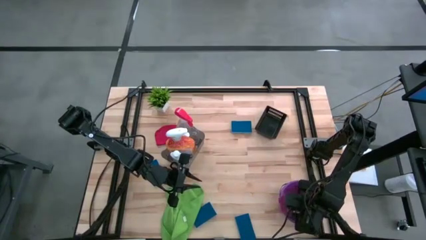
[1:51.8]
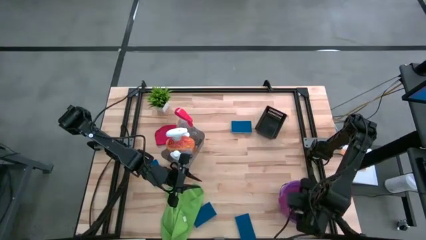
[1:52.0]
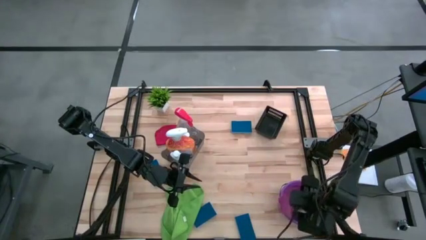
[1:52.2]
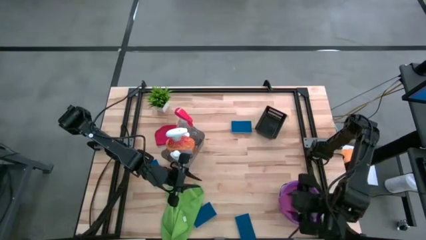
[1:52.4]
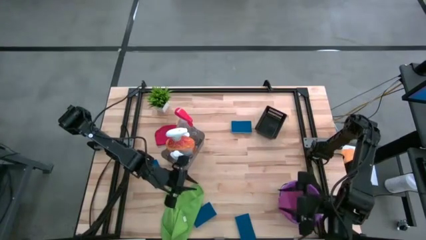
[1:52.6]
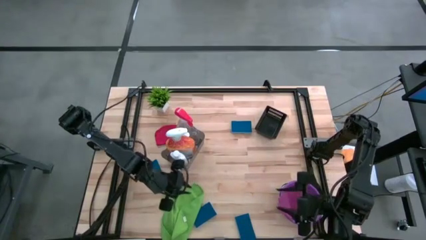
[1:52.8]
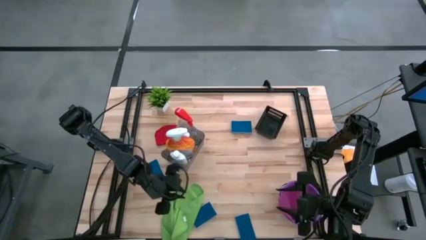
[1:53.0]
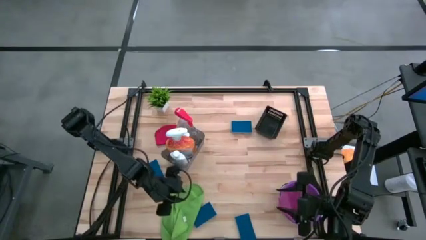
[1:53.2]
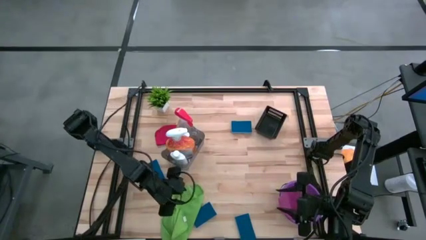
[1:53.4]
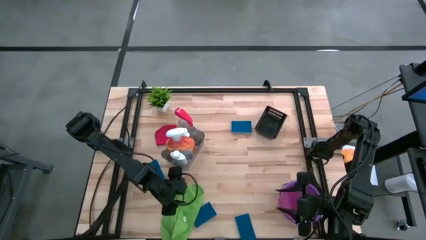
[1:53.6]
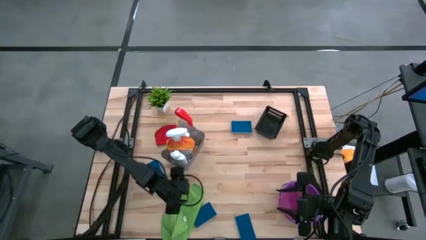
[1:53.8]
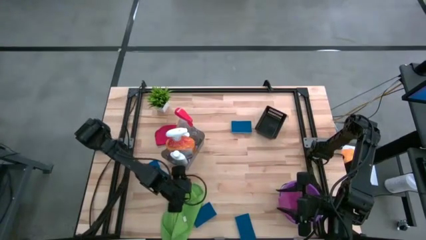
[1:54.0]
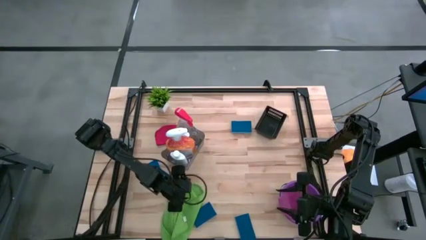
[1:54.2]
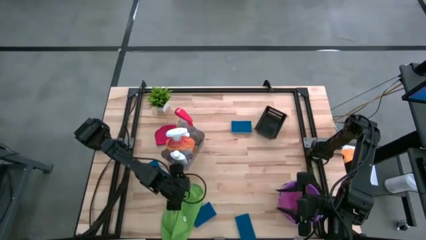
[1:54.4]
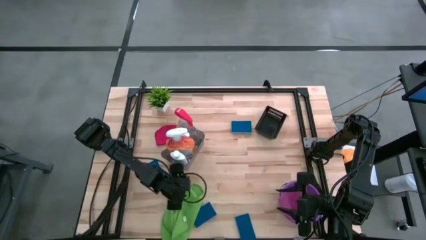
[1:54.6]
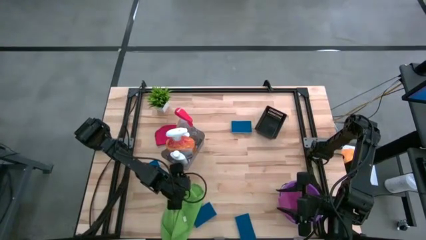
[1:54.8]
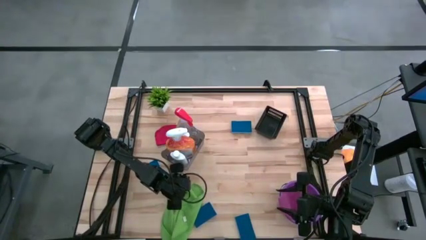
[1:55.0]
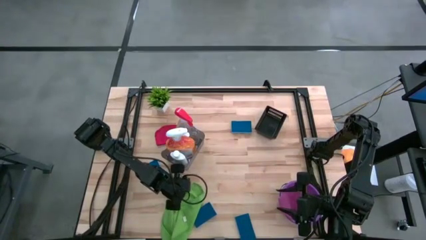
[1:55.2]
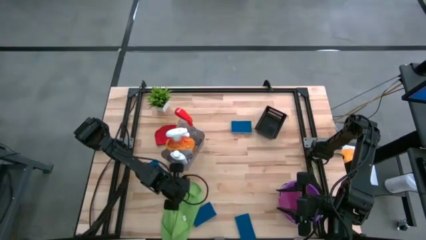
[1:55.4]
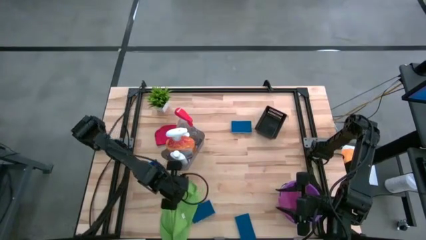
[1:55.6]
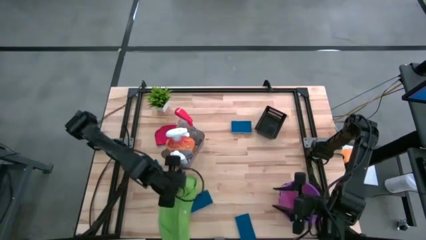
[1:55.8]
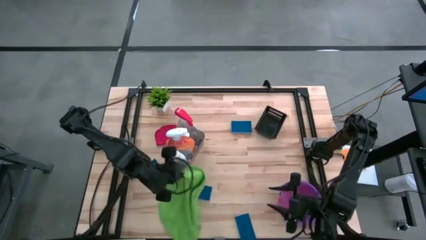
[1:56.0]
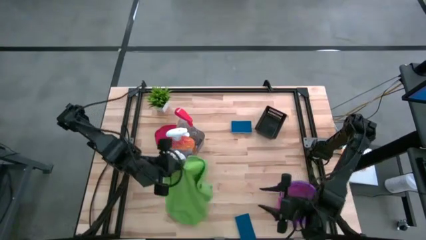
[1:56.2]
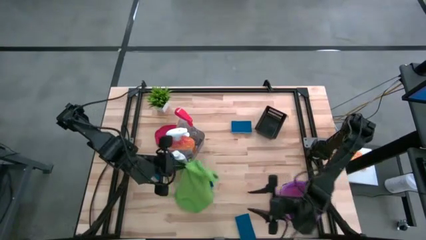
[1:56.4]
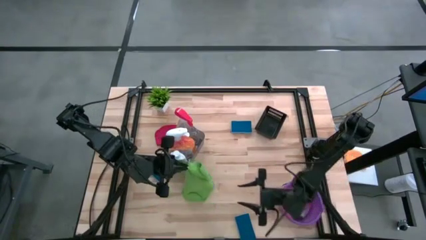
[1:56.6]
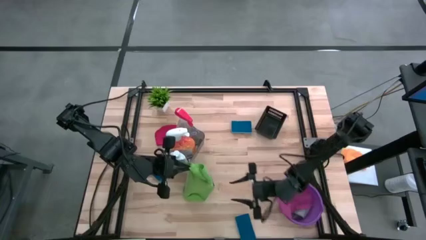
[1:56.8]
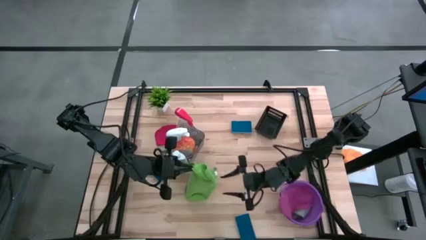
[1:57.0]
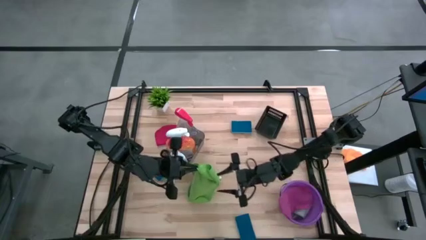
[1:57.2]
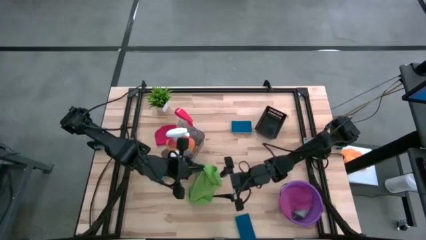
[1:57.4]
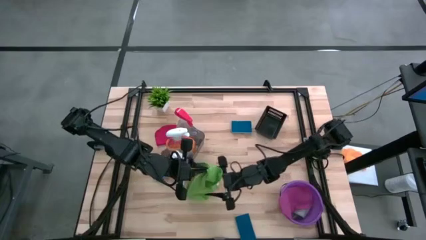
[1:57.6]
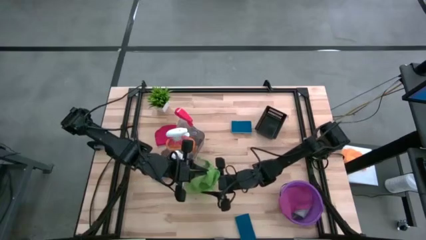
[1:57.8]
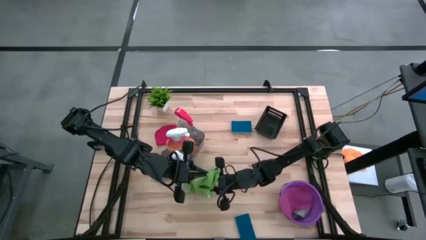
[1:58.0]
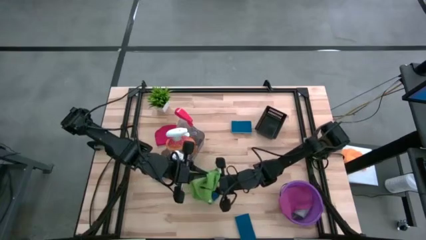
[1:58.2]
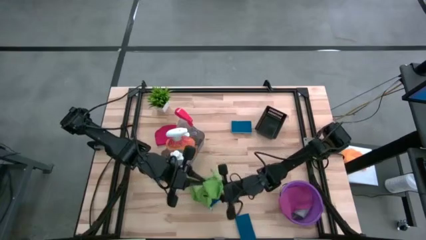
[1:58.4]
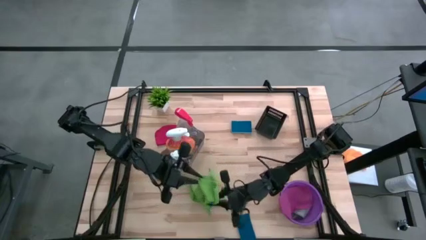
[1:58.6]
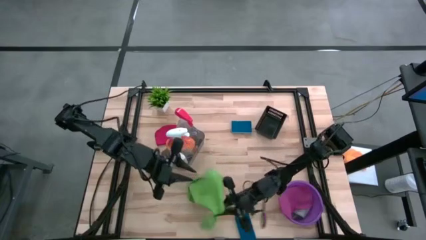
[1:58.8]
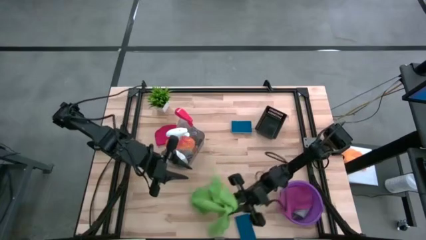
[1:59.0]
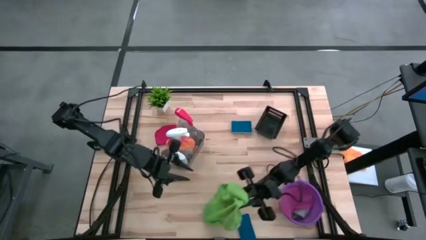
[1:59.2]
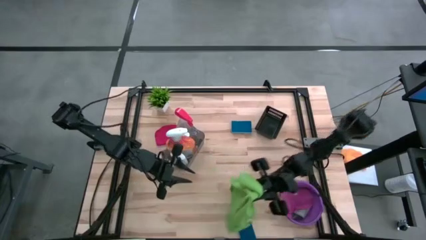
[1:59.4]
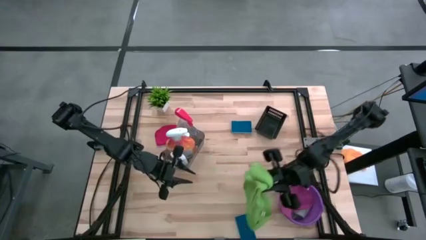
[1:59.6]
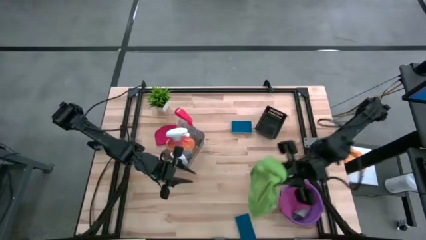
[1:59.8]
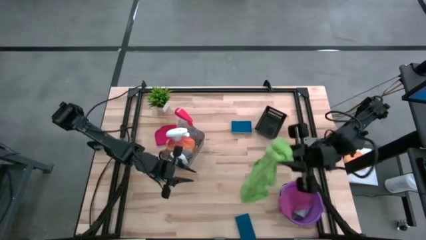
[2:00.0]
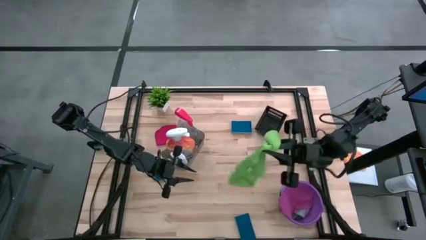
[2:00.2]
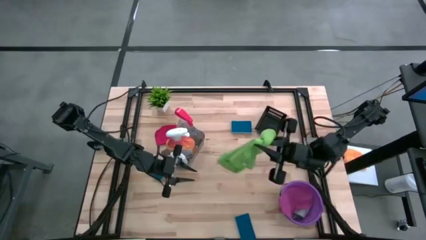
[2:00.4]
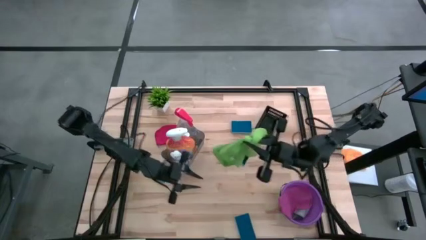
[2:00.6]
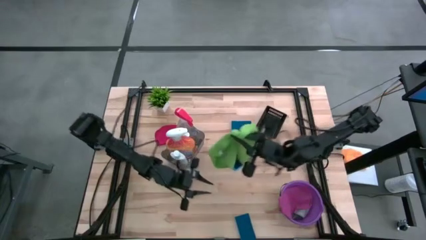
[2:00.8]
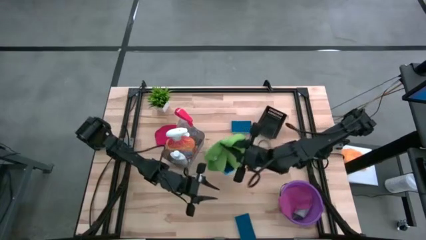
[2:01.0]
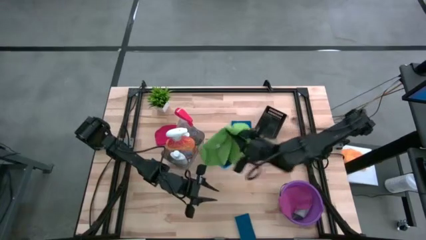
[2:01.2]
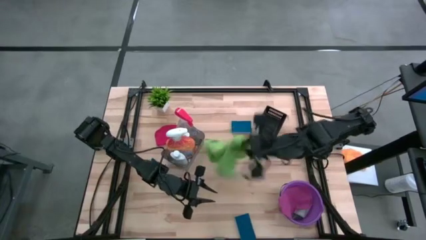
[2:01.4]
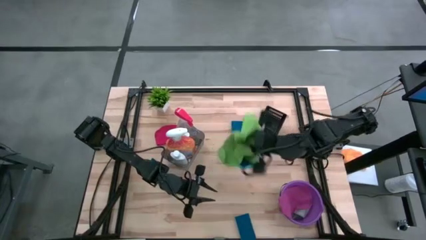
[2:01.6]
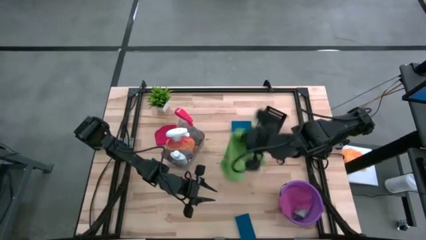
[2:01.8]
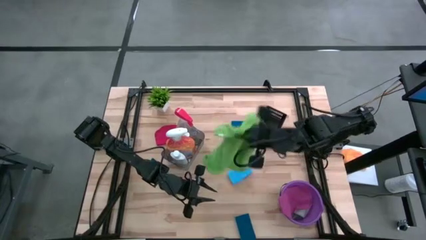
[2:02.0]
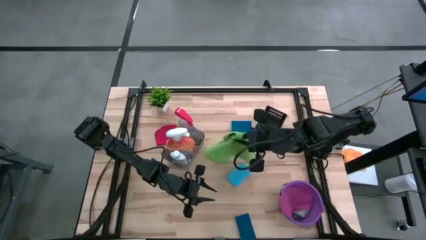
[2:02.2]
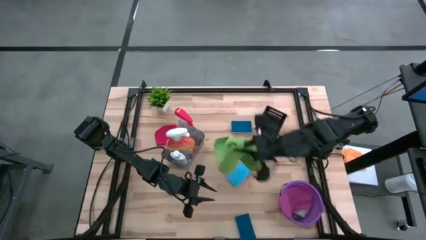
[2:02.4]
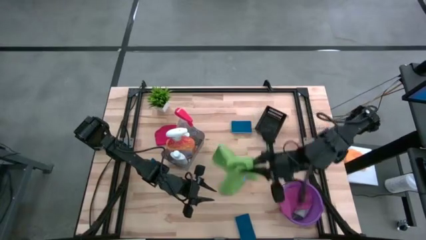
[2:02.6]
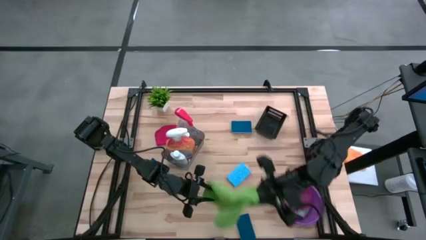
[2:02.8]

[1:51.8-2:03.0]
Task: Pick & Place Kitchen Items
Put the green microfiber cloth into the purple bucket

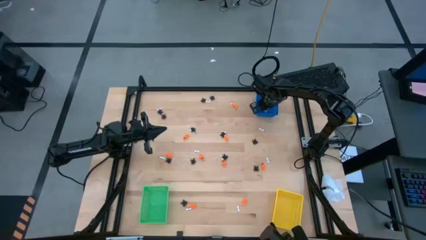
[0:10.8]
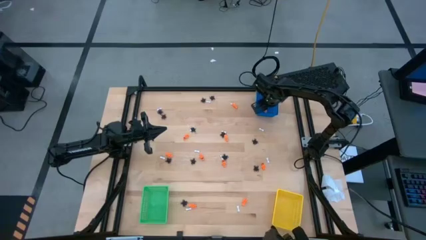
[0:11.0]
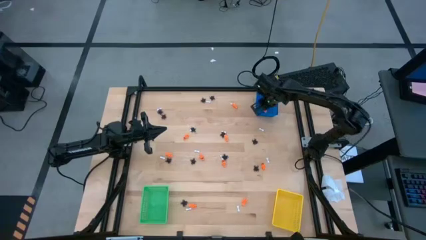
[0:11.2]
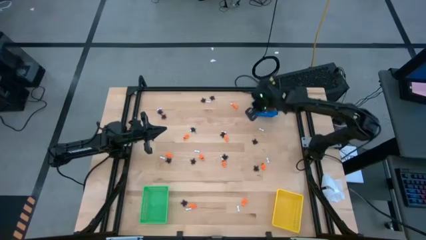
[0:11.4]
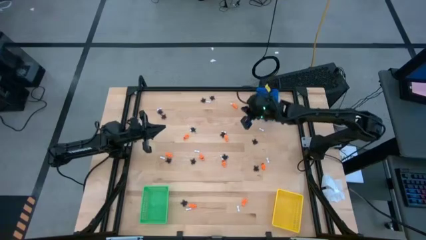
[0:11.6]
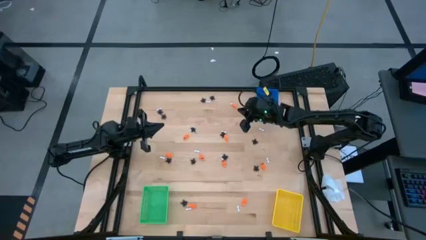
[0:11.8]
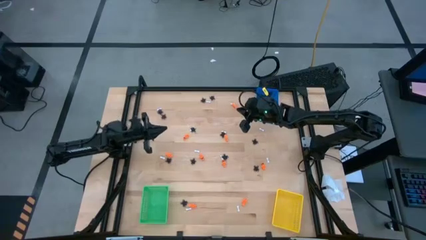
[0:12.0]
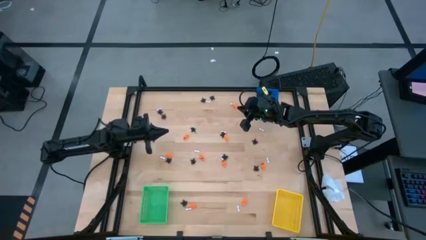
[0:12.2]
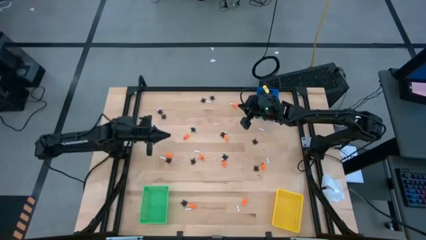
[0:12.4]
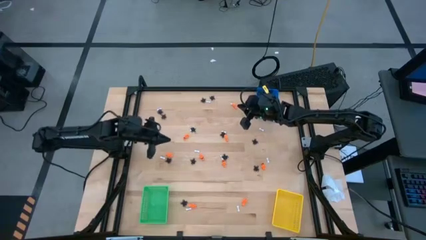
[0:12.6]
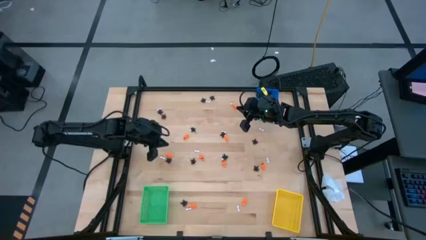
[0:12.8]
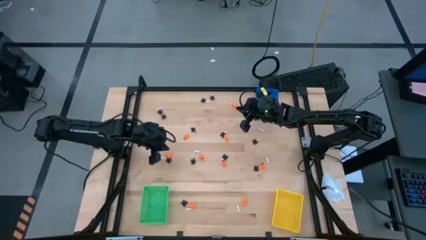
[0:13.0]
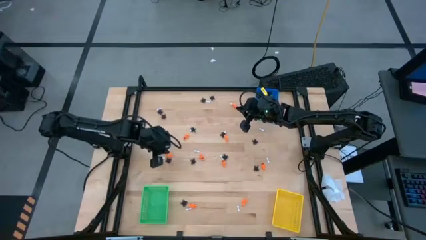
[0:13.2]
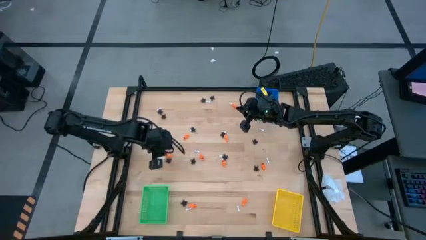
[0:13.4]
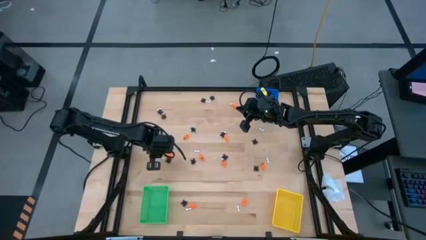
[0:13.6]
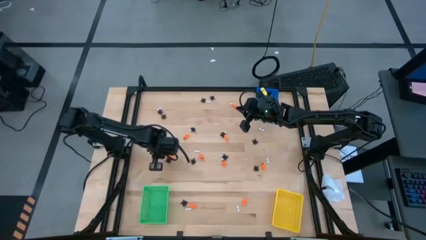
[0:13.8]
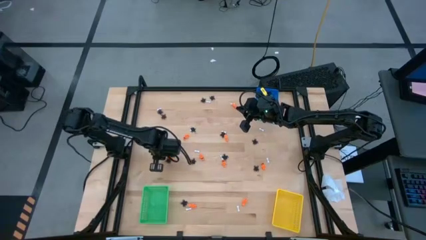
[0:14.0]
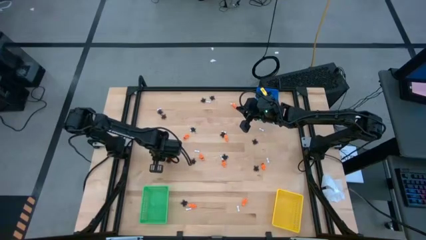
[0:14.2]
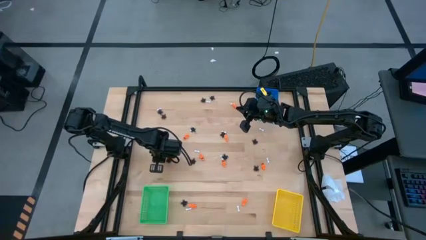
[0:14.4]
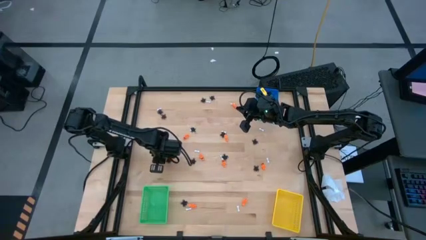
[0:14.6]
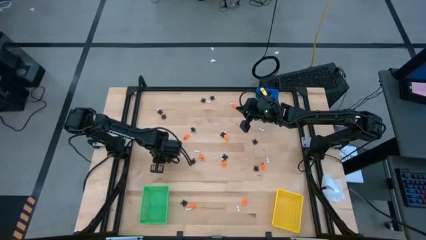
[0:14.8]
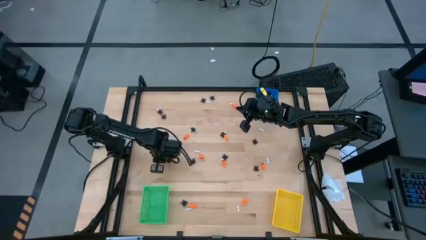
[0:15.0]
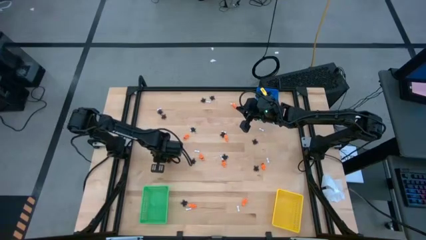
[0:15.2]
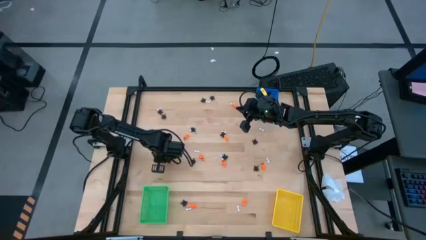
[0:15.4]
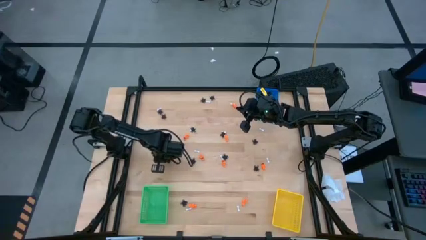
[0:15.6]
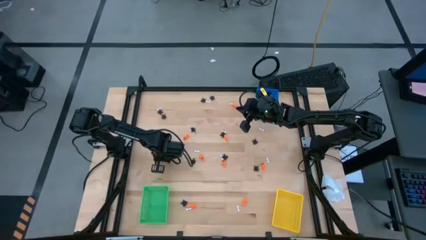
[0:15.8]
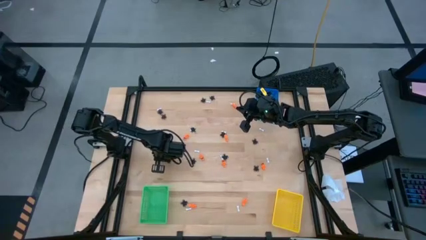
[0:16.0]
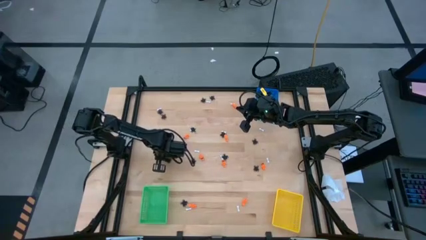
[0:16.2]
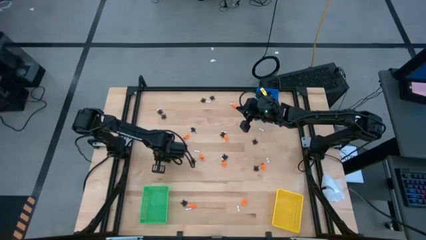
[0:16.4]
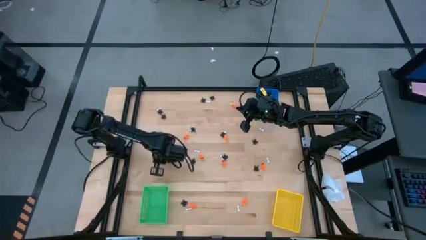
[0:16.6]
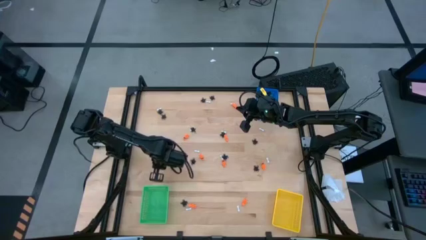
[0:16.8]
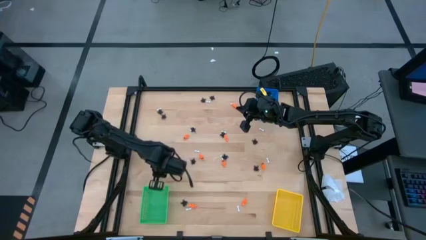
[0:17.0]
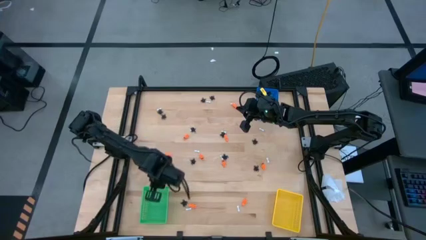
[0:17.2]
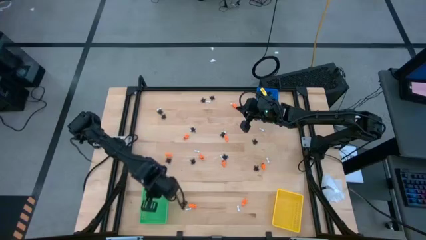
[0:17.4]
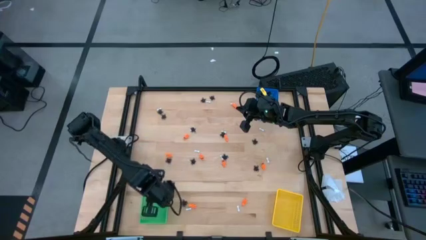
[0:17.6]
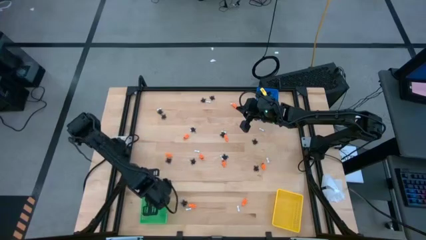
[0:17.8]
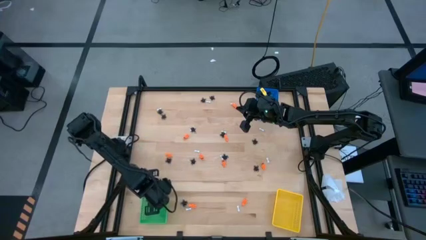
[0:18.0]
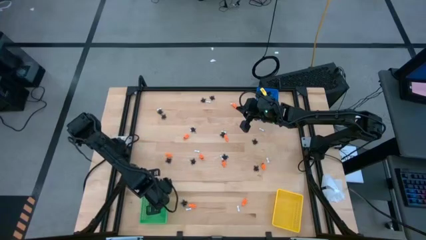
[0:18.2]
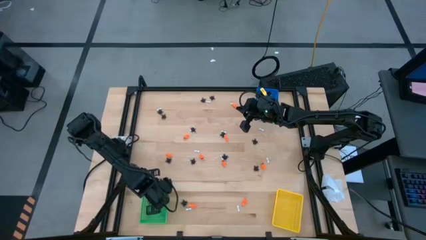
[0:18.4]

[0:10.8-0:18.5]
Task: Sort Halloween decoration
Put the white bone toy into the green bin
